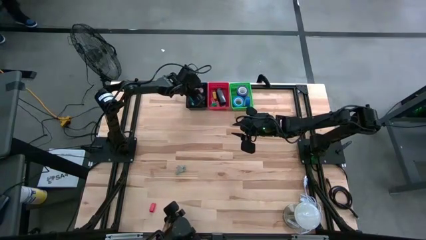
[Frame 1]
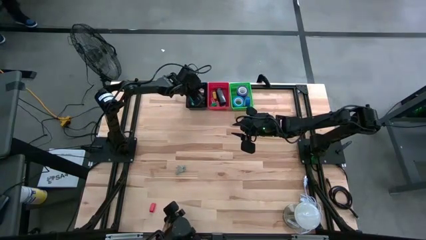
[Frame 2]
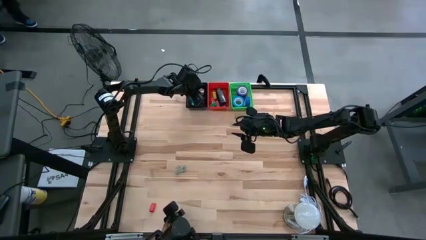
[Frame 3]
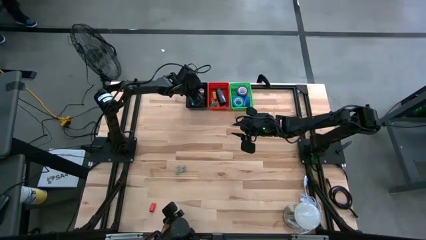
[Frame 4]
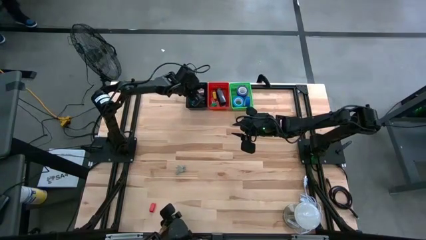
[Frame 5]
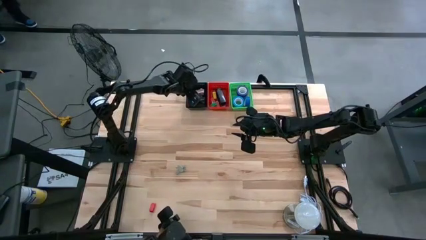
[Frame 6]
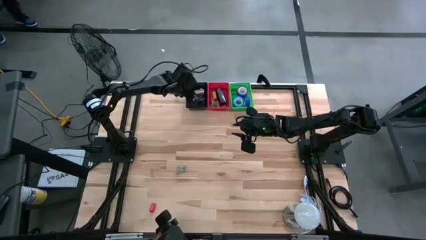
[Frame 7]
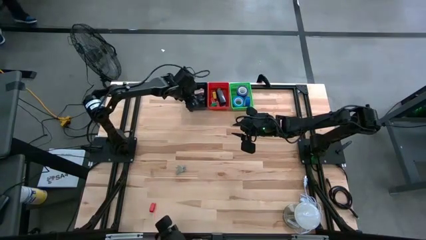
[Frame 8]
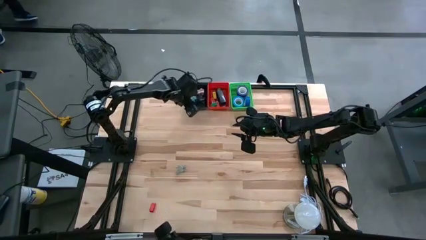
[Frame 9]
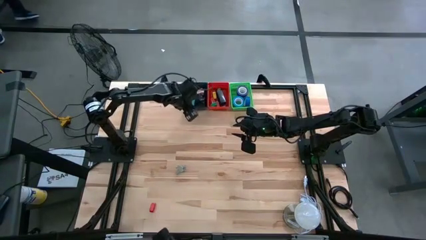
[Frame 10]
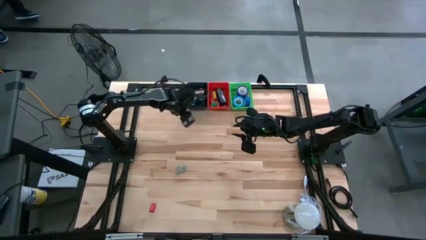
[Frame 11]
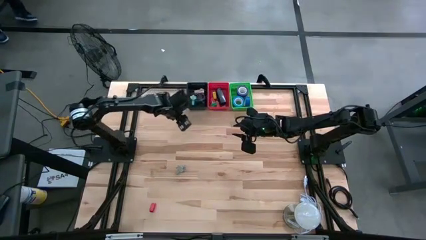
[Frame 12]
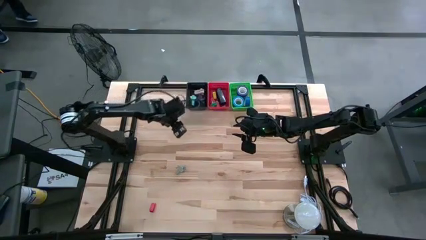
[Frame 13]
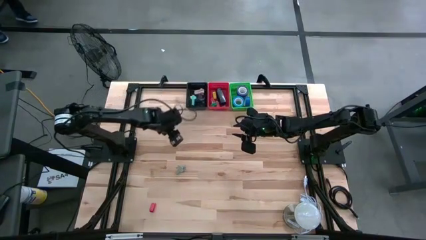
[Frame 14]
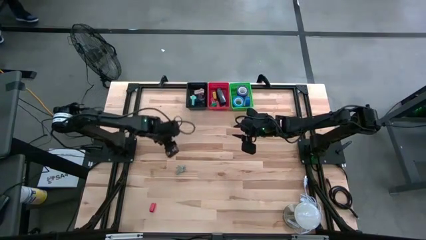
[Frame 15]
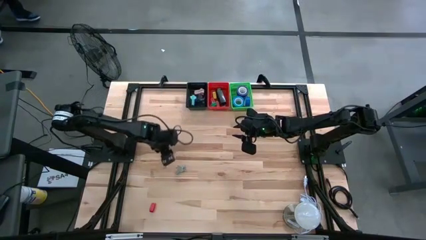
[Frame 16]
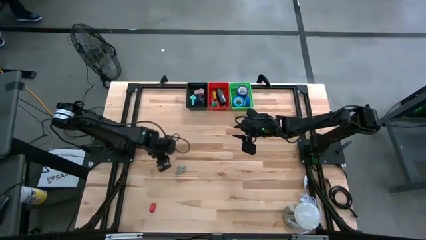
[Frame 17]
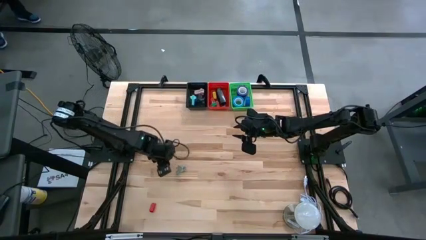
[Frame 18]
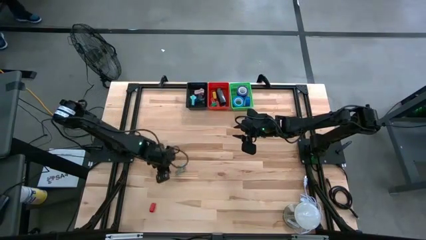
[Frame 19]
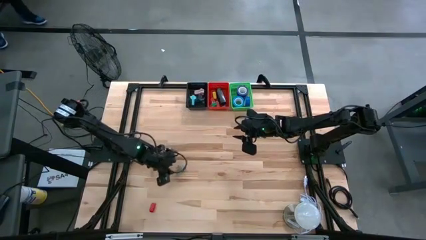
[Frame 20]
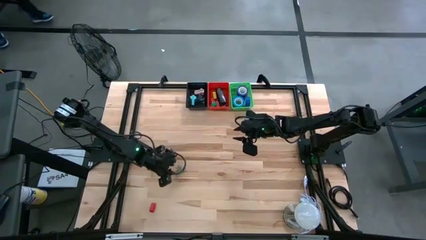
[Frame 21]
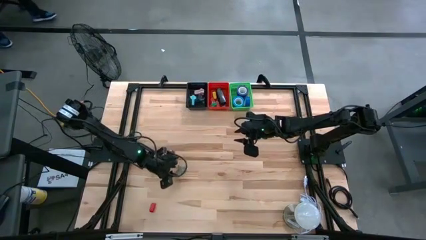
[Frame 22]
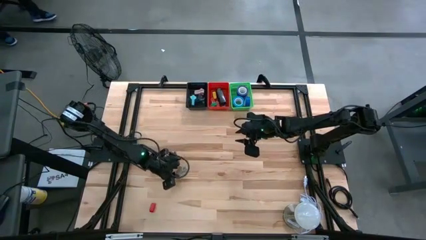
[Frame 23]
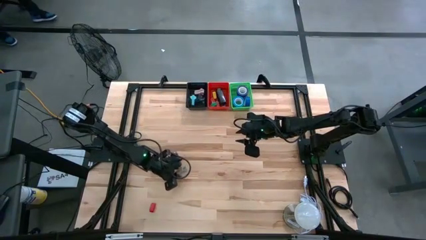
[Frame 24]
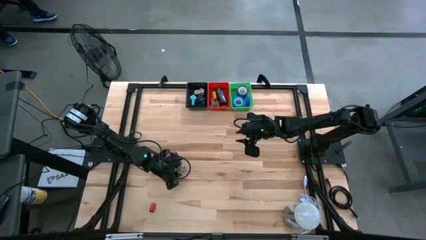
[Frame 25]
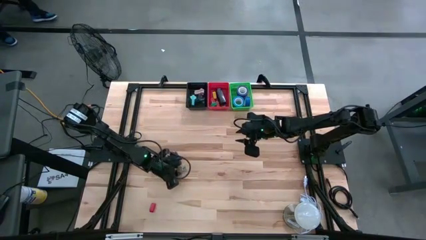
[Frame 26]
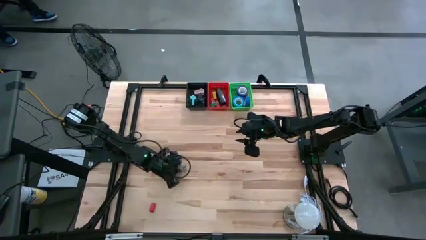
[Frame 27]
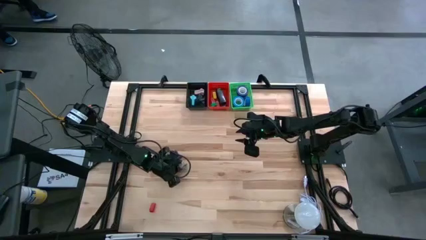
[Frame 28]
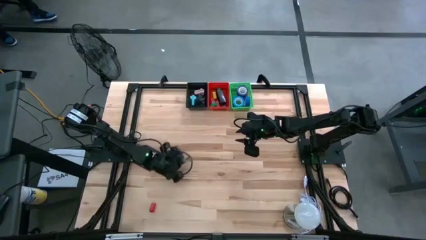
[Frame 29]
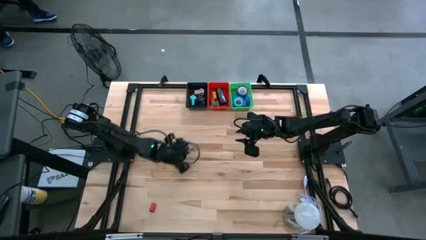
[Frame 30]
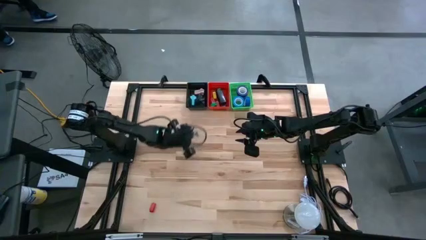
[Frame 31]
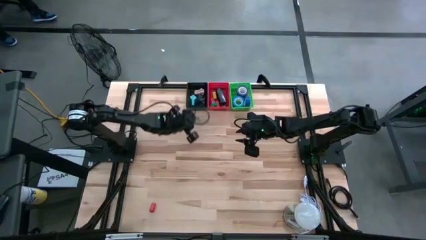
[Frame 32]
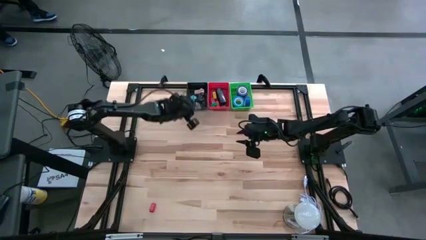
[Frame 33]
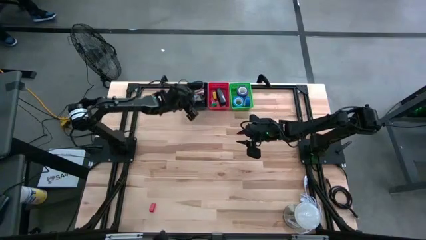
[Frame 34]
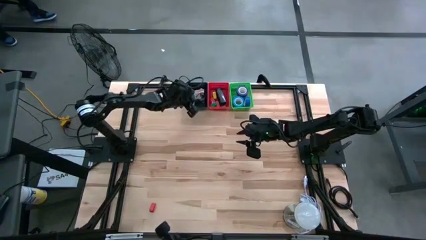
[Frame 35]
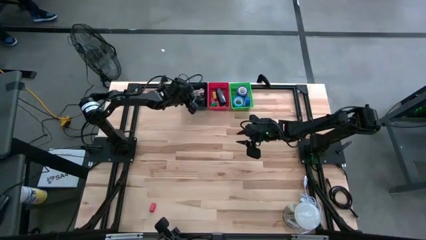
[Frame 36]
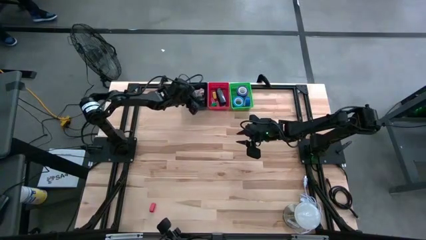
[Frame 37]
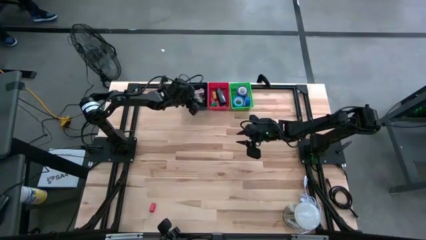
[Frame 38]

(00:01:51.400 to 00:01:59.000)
Task: Pick and place Stapler, Stapler remover, tape
Put the gray staple remover into the black bin

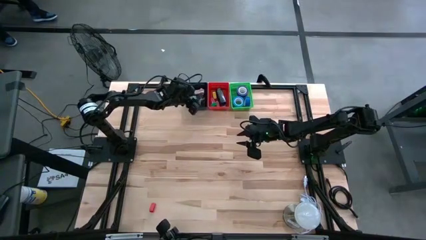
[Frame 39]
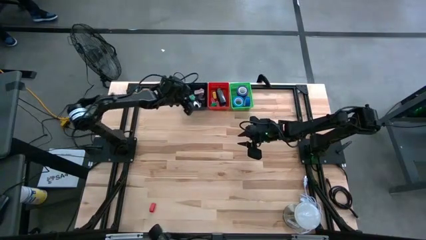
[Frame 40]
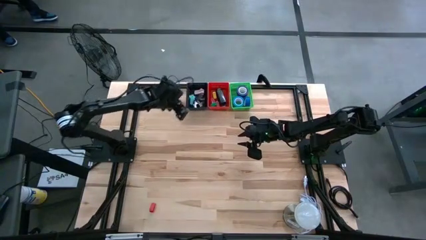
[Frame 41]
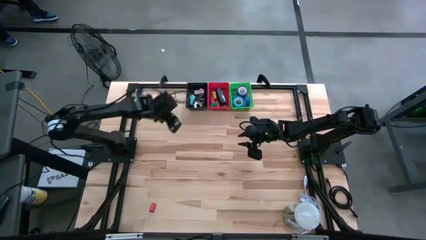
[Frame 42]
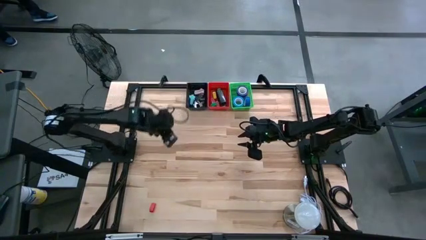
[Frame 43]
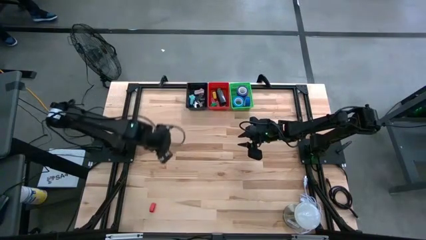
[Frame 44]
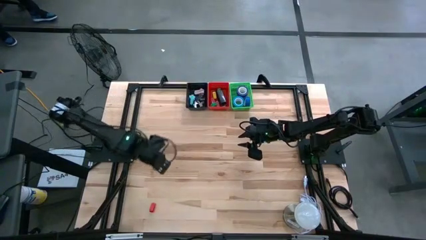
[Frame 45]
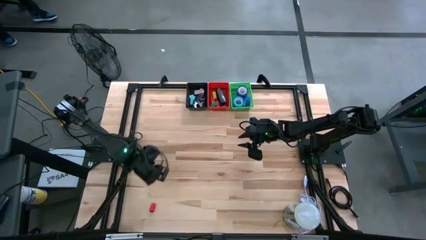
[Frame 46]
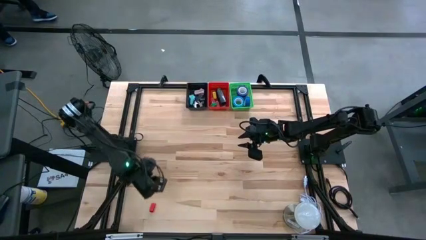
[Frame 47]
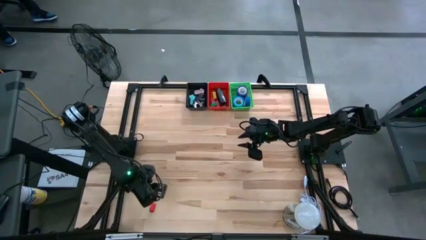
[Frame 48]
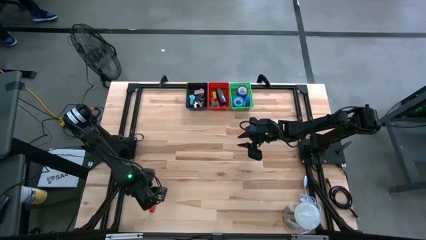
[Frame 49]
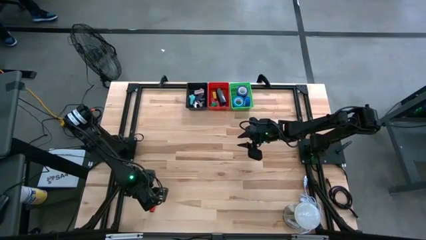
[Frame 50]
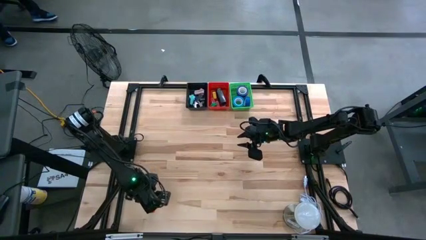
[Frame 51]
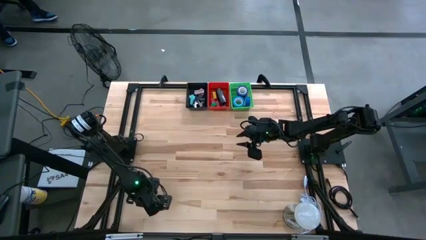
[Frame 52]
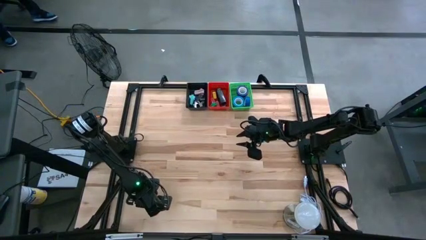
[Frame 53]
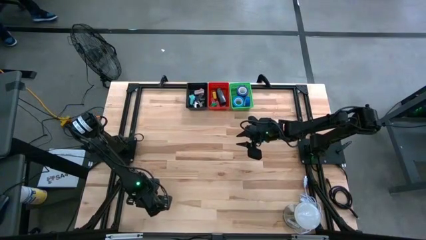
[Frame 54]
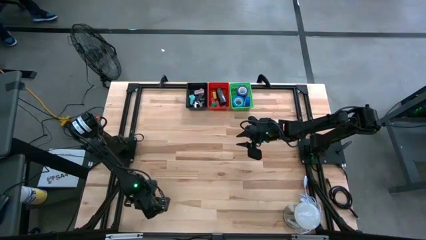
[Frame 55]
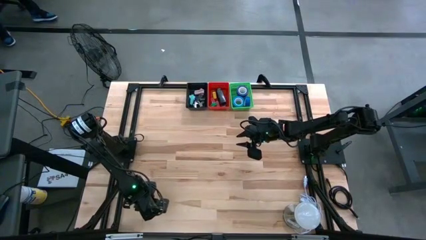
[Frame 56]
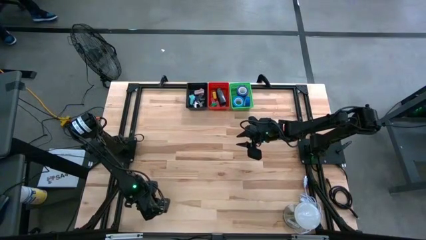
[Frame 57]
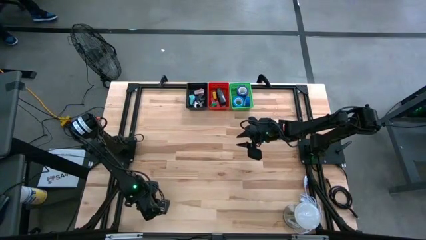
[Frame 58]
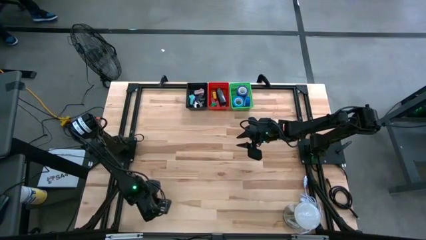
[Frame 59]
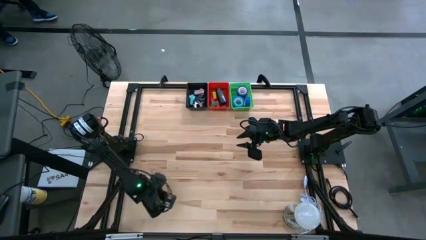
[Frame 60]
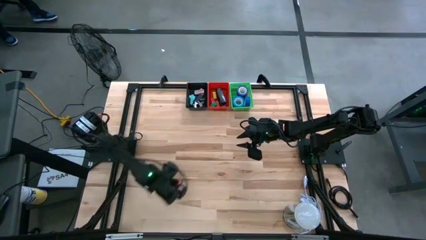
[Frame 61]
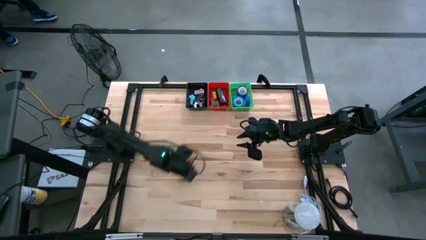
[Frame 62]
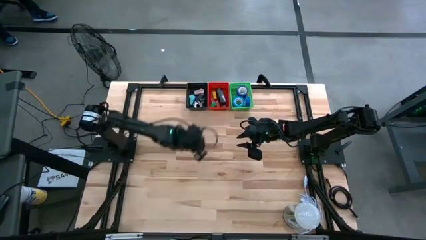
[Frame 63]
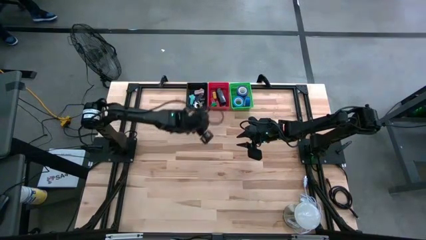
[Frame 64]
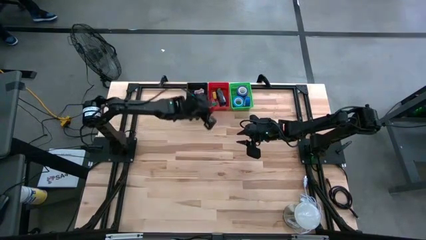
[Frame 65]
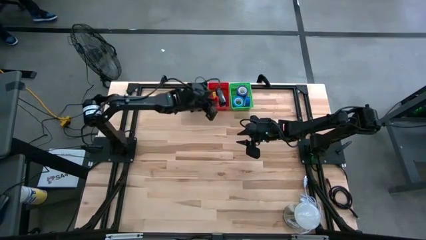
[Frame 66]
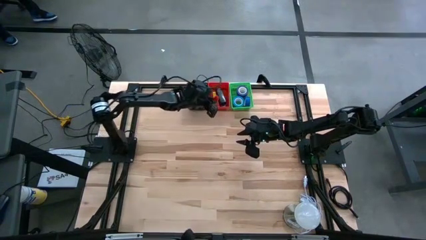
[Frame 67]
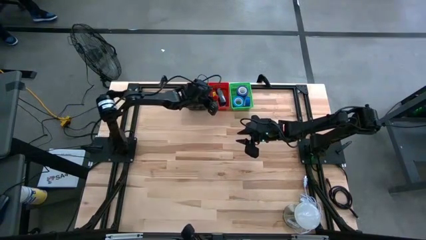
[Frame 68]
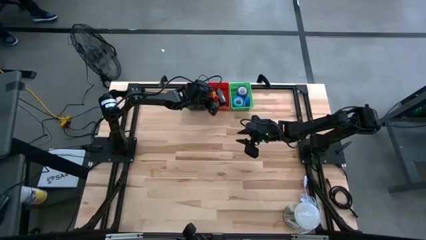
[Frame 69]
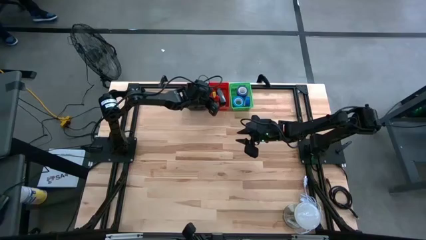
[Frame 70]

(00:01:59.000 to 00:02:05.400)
Put the small red stapler into the red bin

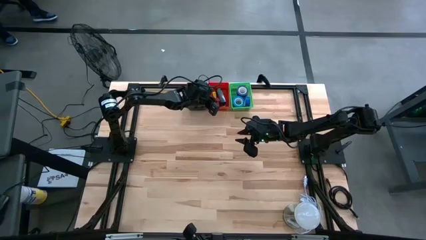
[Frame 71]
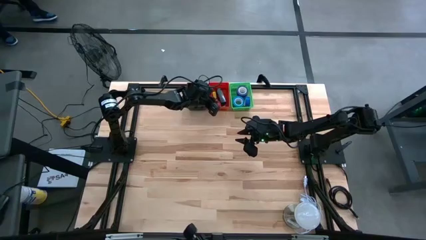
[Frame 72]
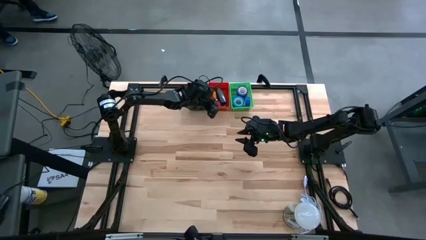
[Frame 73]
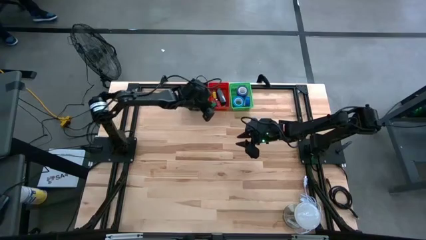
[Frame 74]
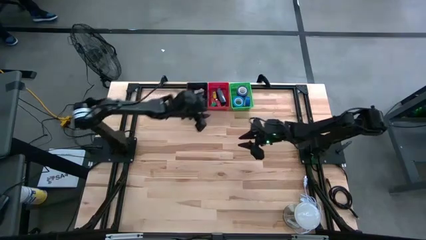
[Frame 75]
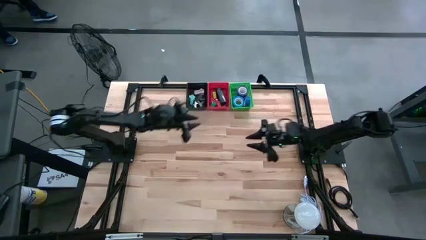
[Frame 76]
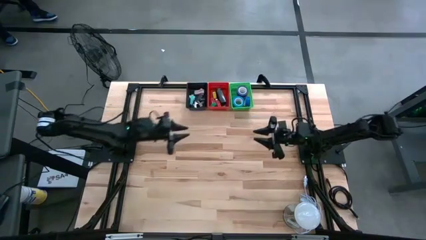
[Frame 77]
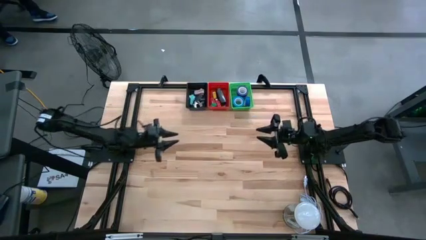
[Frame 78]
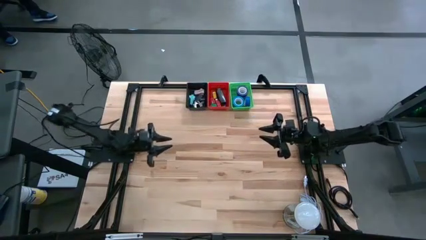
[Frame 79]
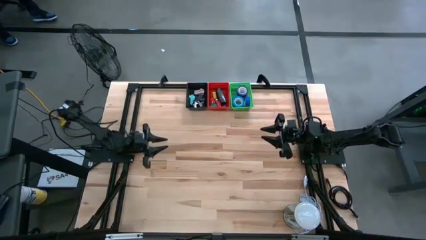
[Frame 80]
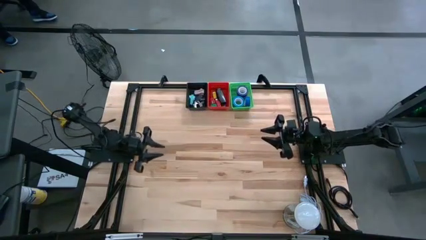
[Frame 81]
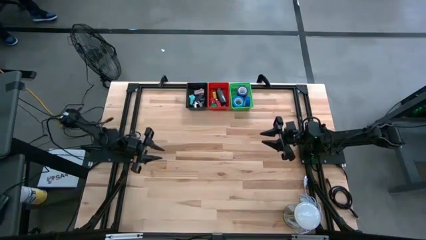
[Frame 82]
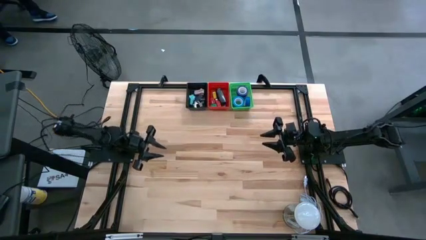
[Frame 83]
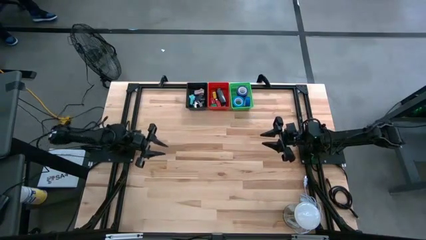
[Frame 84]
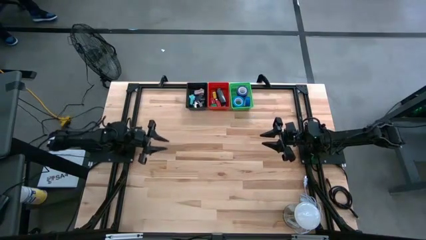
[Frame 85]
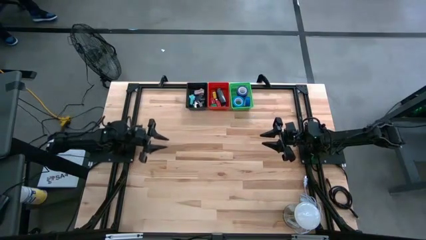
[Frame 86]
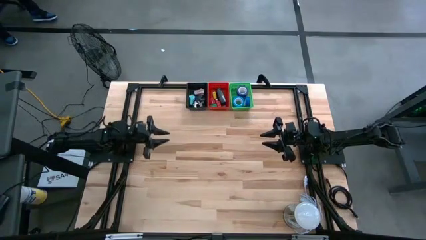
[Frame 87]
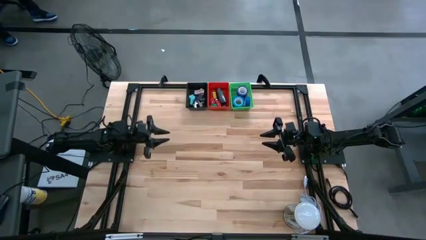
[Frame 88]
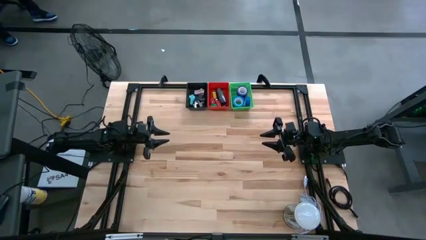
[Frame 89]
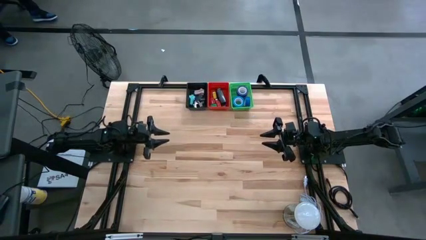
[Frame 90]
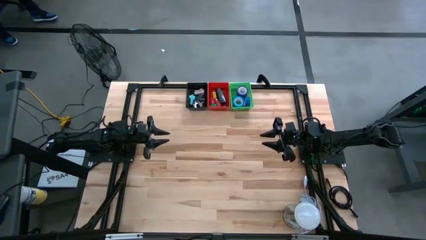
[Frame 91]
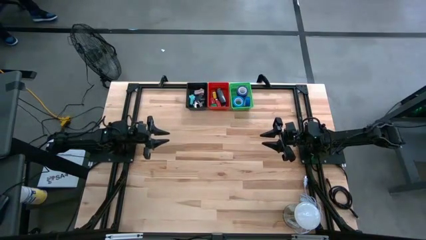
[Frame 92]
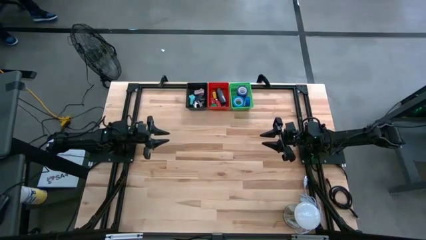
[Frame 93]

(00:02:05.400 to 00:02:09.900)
Return to Home Position
